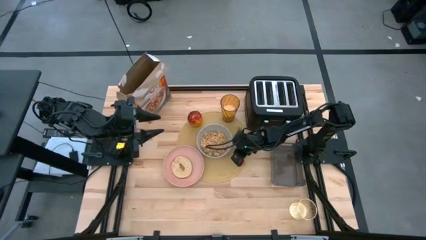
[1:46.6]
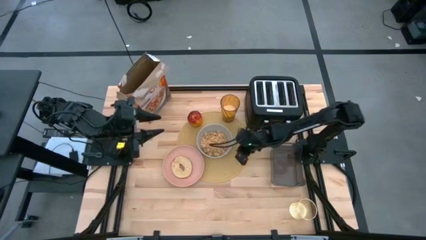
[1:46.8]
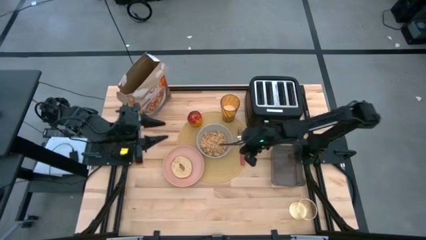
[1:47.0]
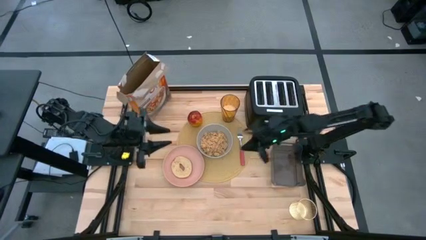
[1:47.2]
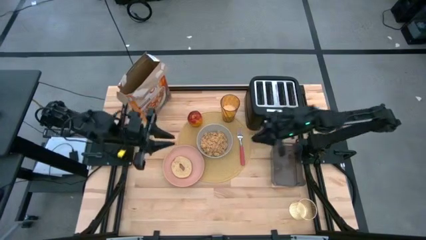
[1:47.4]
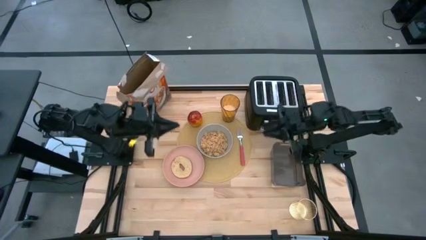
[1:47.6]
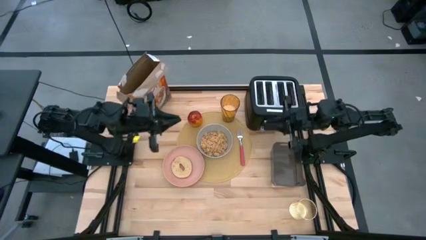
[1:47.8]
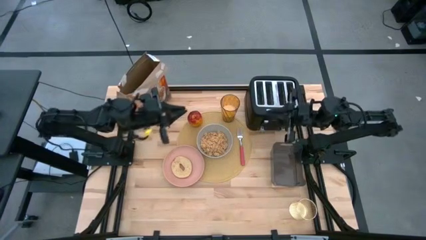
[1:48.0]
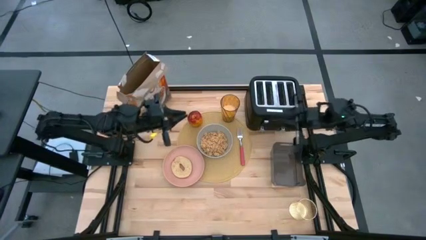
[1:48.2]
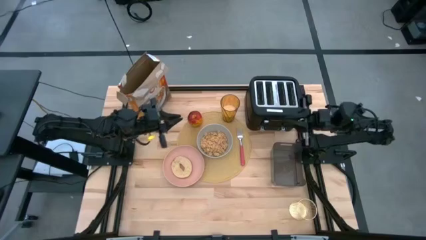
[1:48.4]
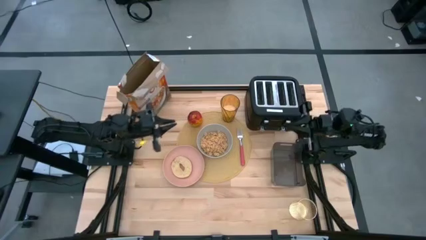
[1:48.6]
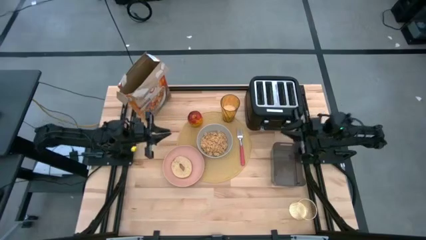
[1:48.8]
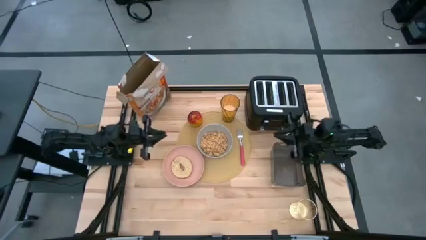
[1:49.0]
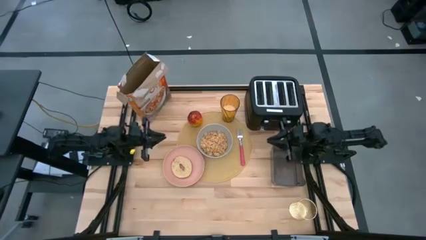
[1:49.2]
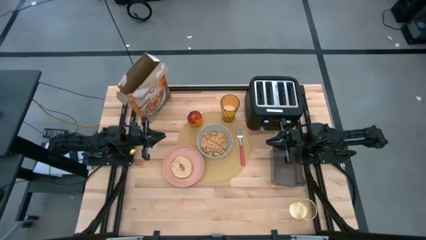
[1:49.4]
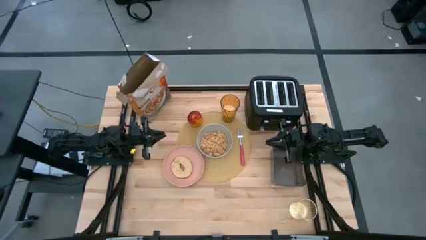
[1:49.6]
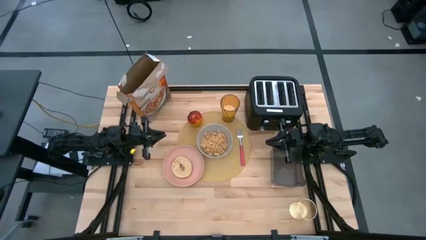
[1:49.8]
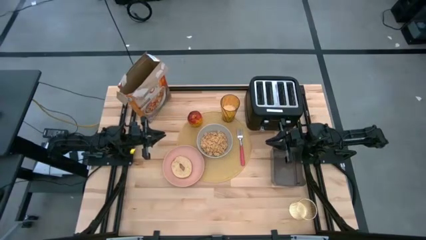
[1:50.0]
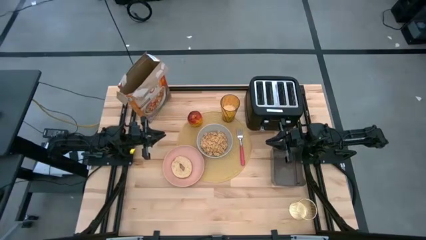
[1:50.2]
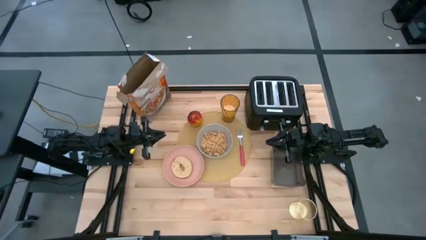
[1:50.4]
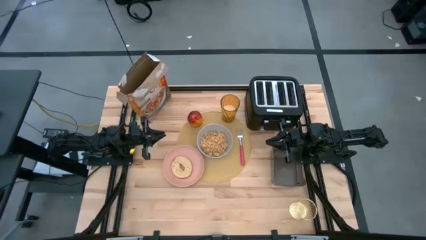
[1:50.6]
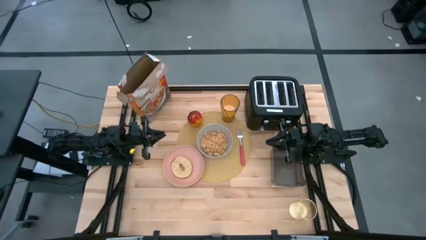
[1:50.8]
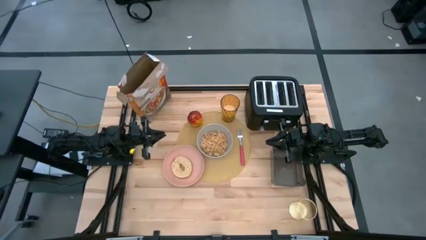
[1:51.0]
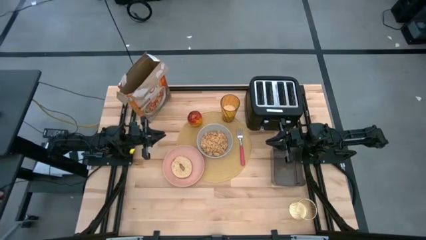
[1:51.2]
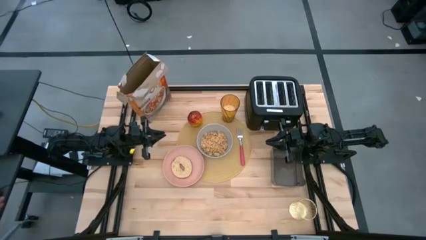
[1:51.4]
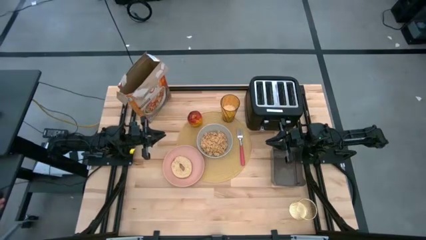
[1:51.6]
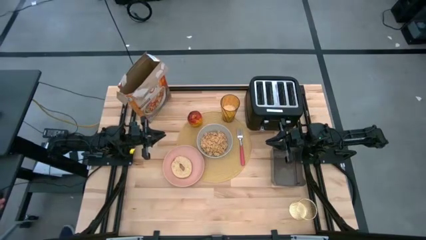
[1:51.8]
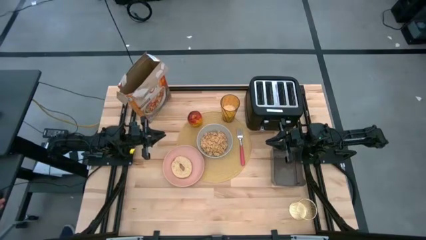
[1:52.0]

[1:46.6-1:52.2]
Task: Arrange a breakfast setting
Return to Home Position

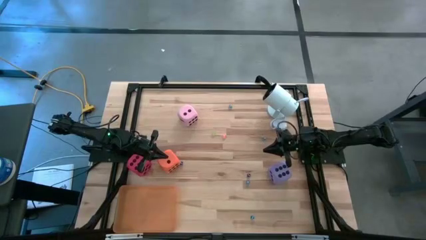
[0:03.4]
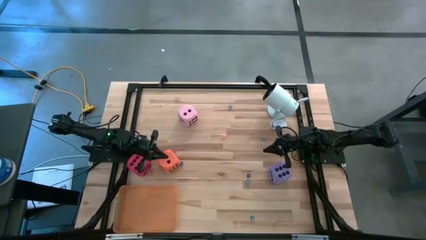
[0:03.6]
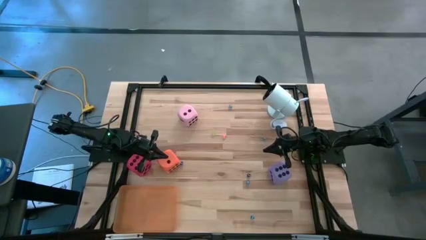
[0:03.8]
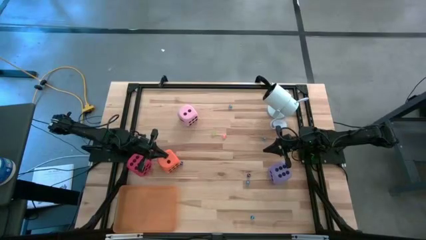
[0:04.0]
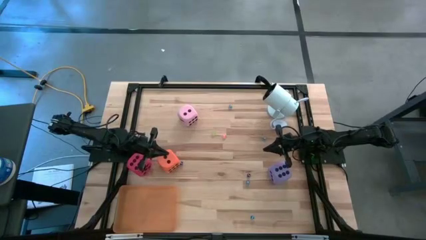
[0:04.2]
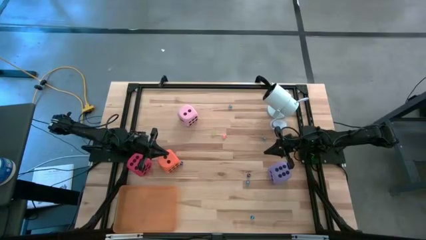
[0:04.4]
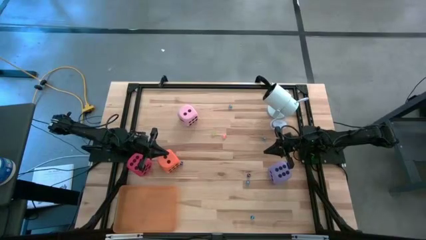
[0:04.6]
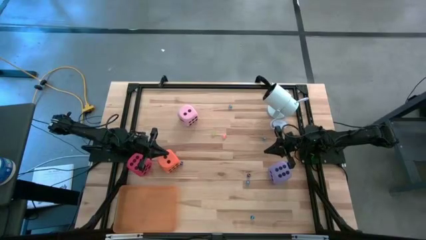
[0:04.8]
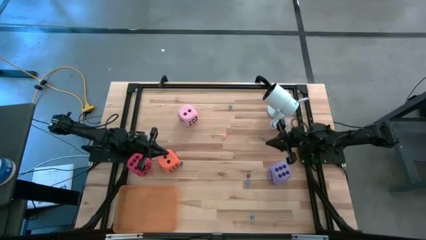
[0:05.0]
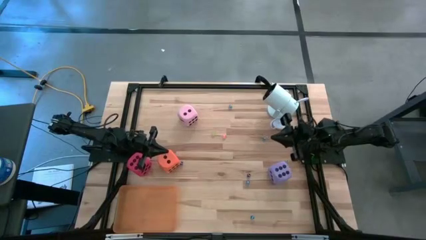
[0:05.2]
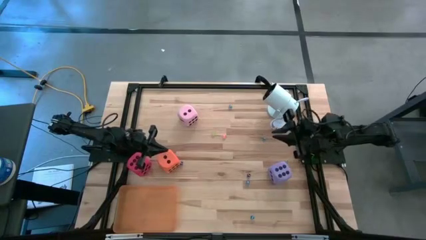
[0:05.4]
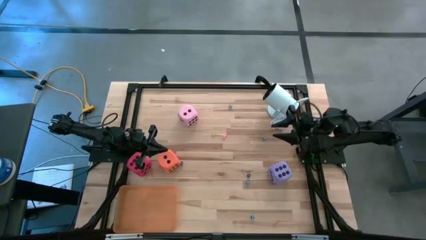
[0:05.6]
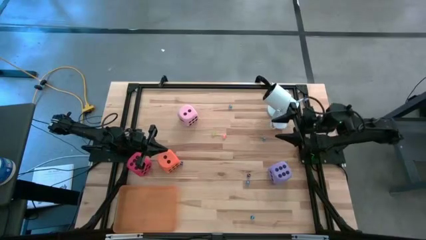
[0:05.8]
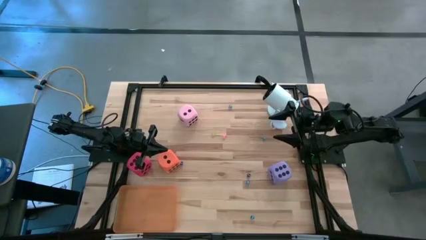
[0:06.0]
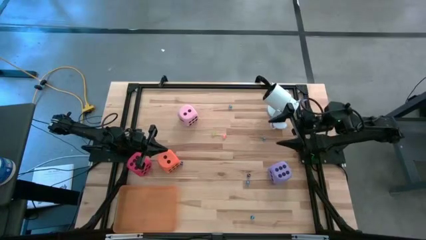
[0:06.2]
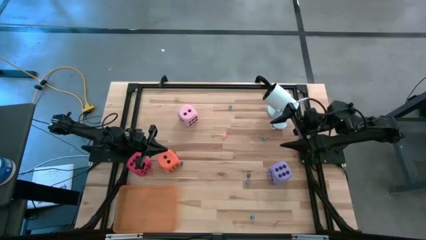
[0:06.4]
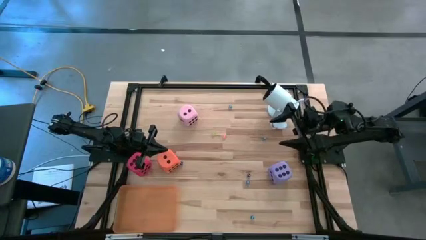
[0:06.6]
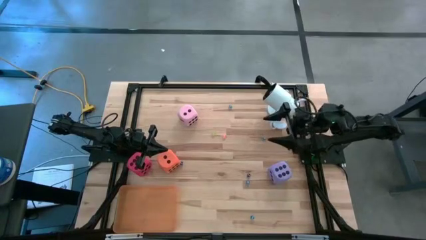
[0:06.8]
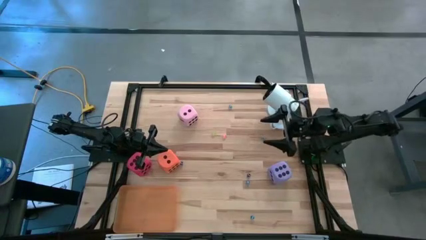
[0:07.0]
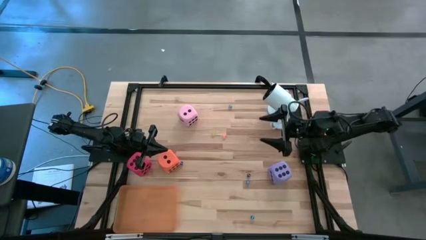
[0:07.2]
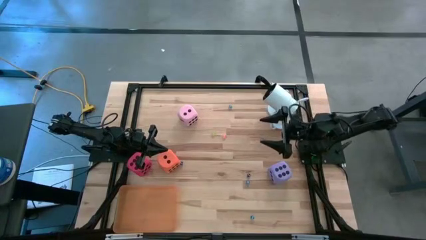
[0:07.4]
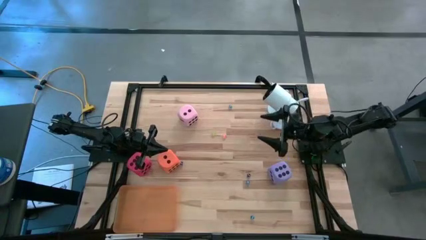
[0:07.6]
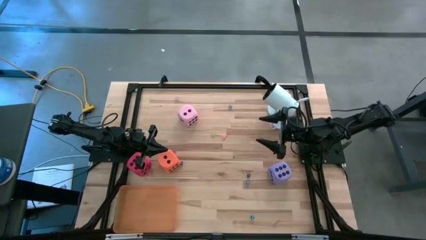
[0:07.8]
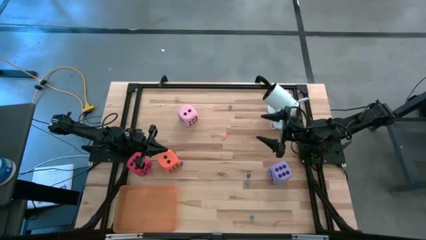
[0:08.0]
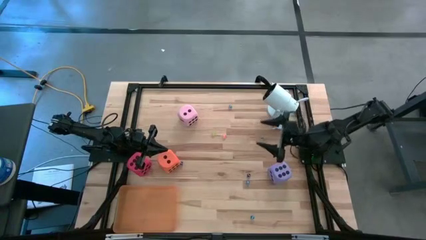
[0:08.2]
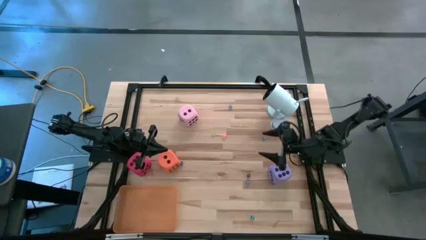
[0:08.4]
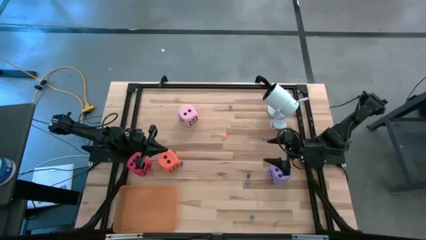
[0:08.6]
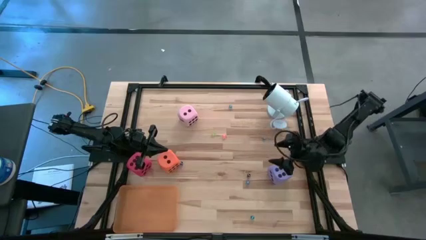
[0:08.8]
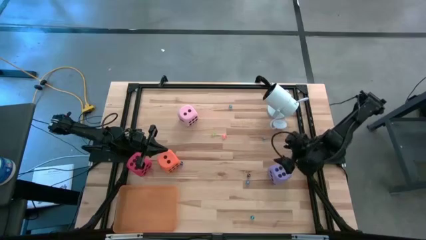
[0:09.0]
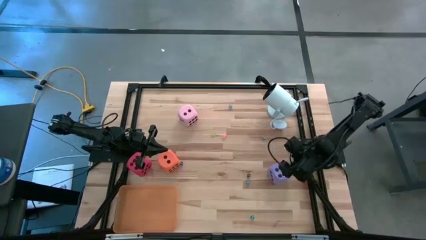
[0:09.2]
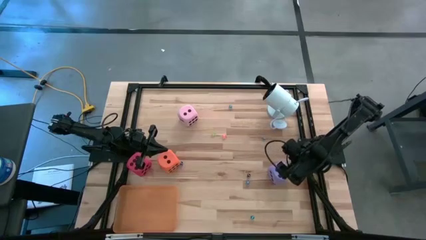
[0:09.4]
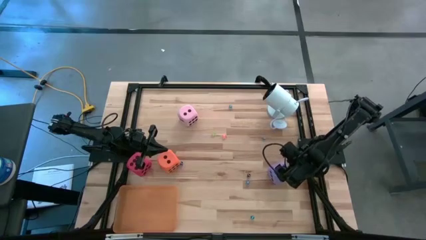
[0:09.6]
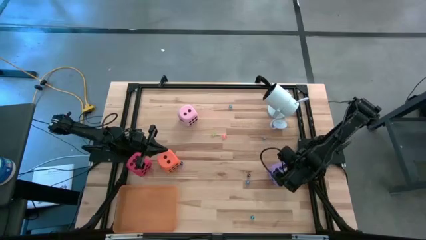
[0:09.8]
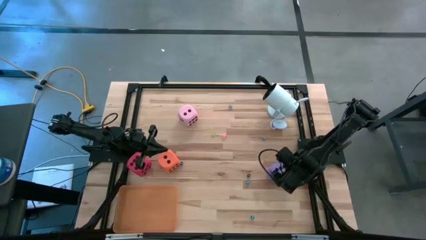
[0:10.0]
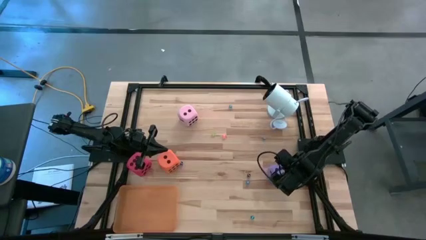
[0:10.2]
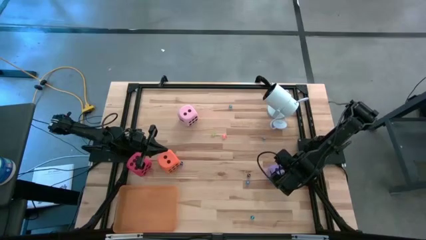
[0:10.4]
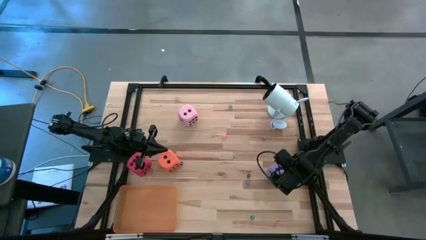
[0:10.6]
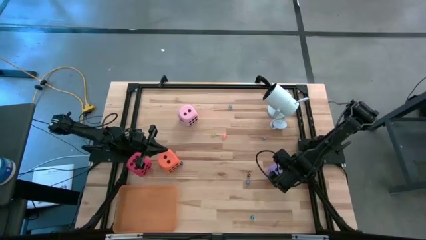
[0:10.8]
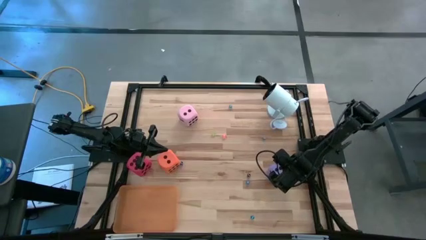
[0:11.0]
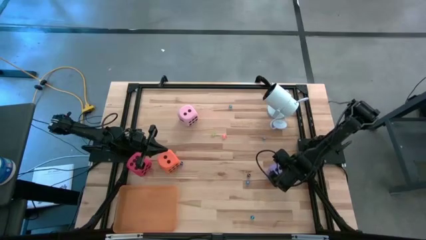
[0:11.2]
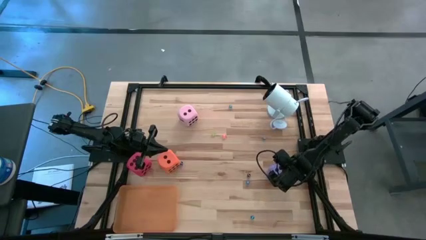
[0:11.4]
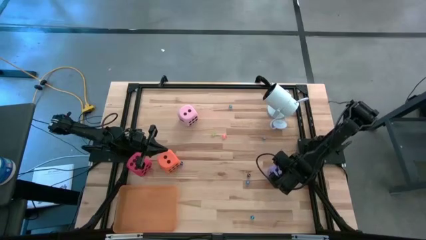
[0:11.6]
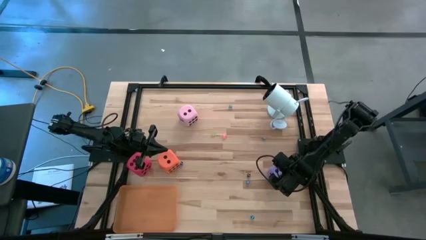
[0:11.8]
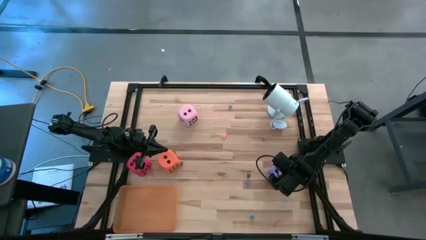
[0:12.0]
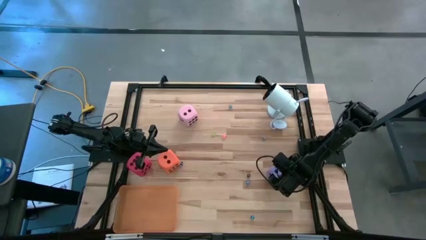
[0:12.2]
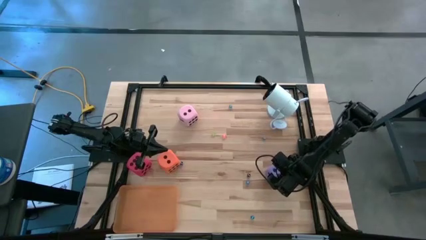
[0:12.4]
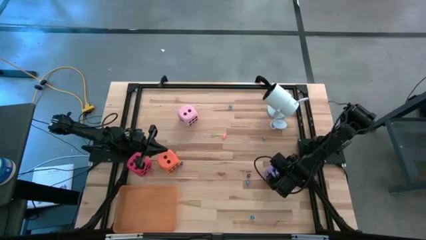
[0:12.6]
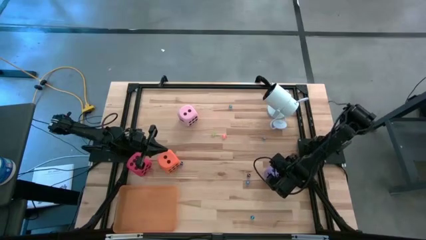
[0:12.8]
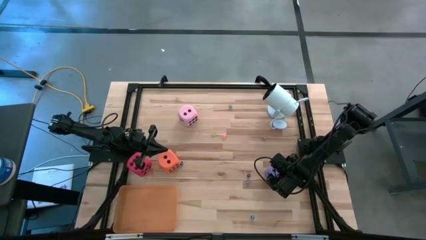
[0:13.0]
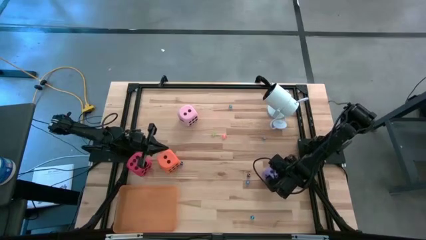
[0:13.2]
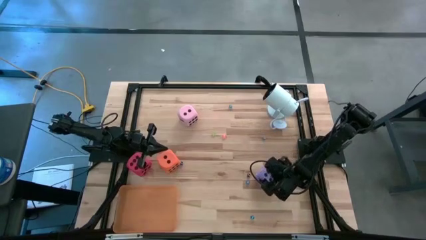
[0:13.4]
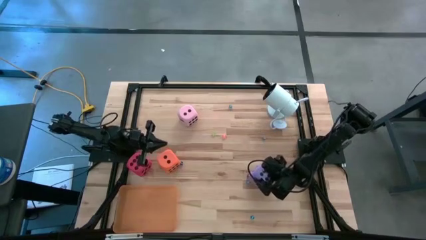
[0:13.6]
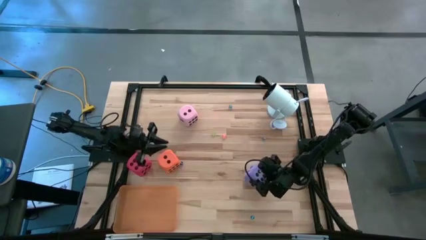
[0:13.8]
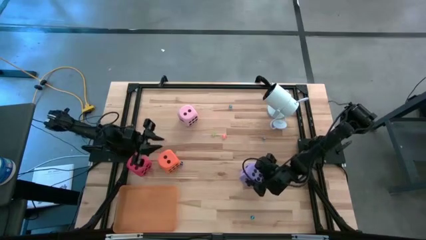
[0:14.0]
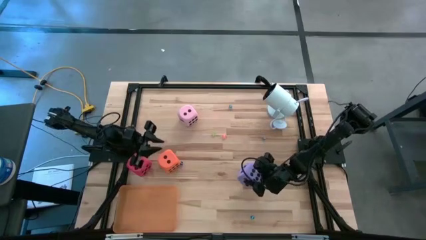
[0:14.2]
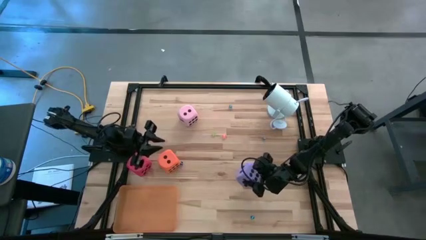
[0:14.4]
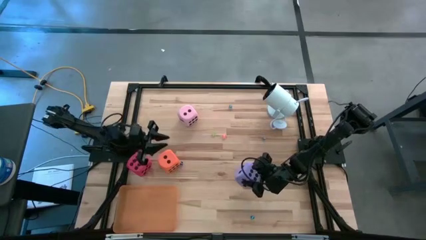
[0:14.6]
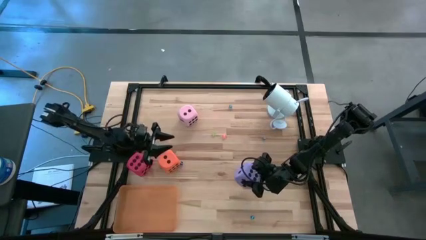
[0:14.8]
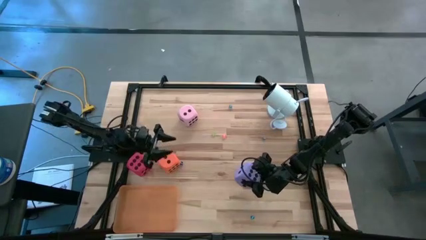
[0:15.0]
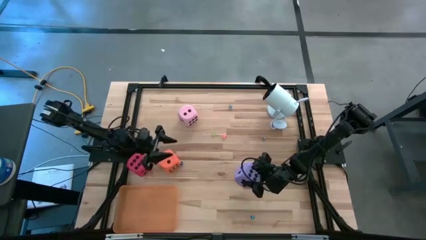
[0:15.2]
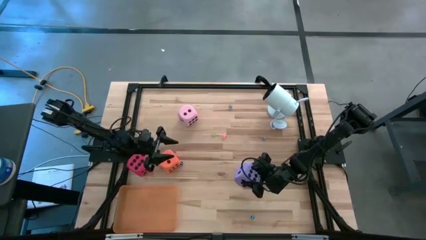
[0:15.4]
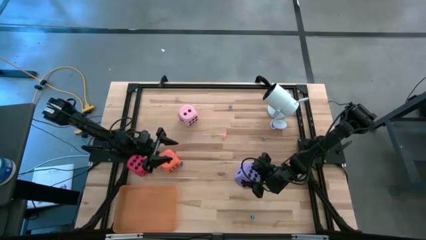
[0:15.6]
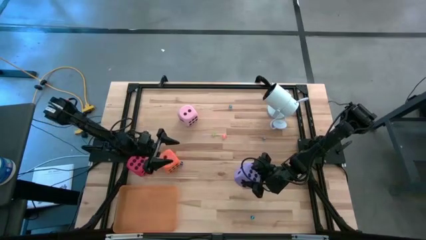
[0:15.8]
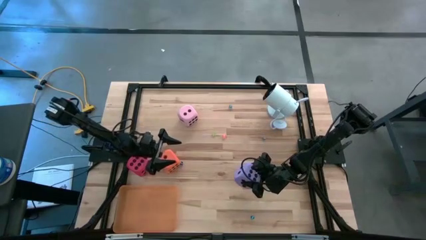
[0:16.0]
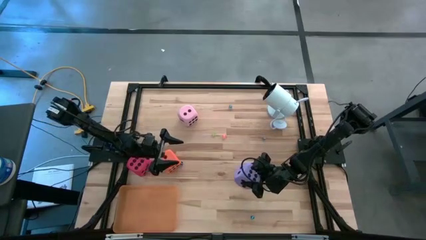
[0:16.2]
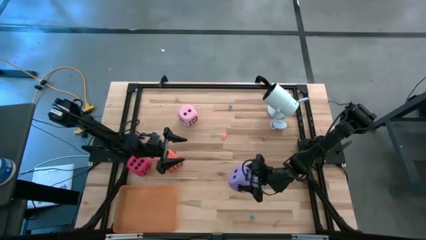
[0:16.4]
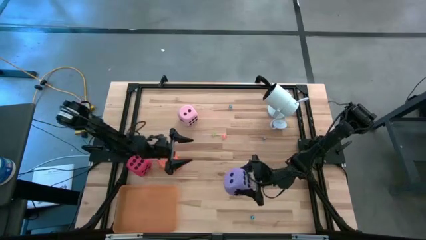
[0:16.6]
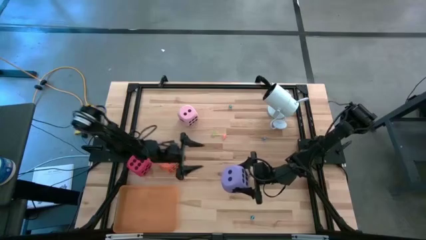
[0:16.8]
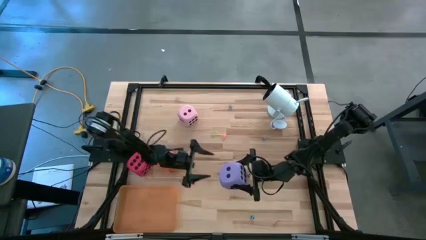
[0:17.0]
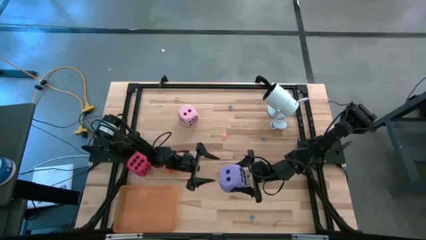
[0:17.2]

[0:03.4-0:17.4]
Task: Pick & Place Dice
Put the large purple dice into the orange bin
